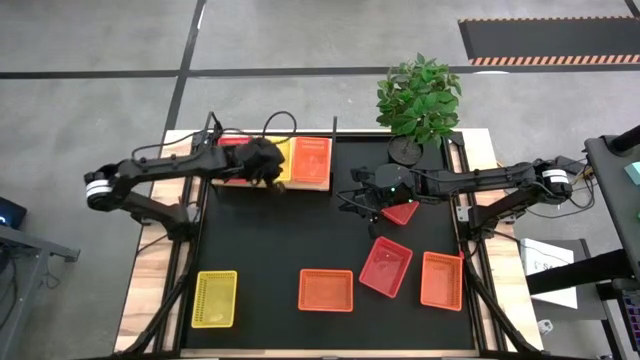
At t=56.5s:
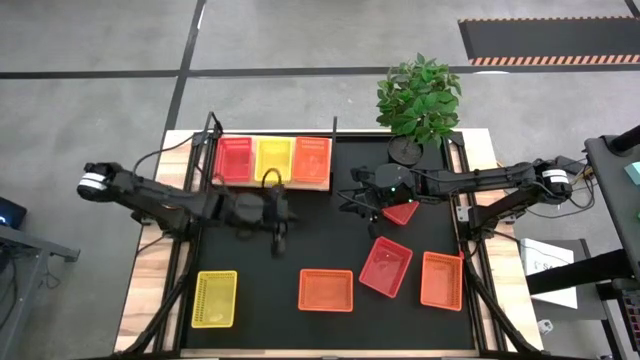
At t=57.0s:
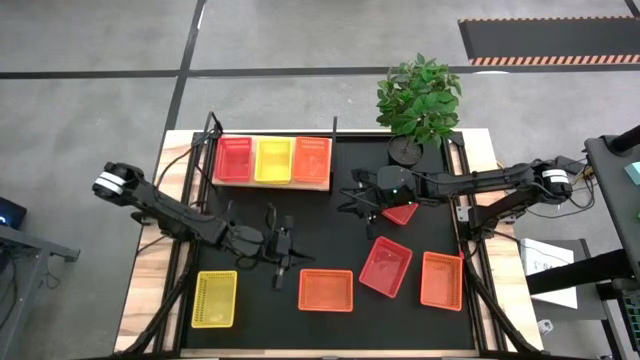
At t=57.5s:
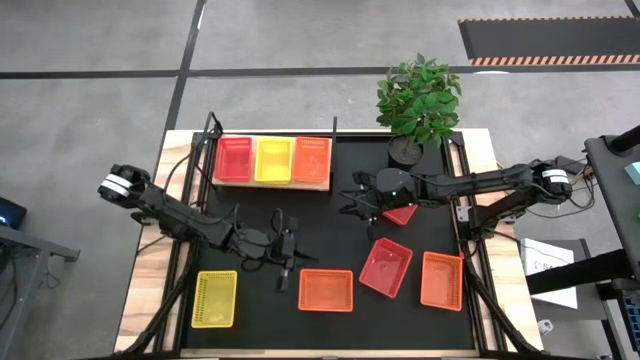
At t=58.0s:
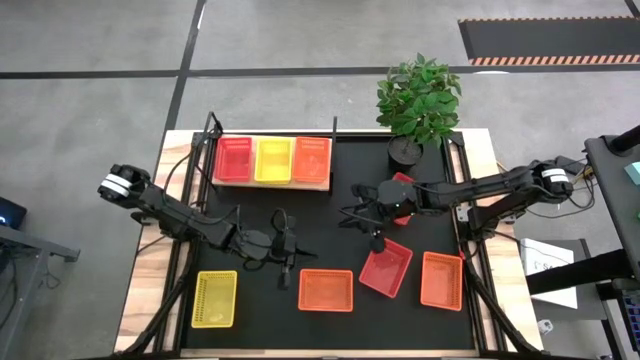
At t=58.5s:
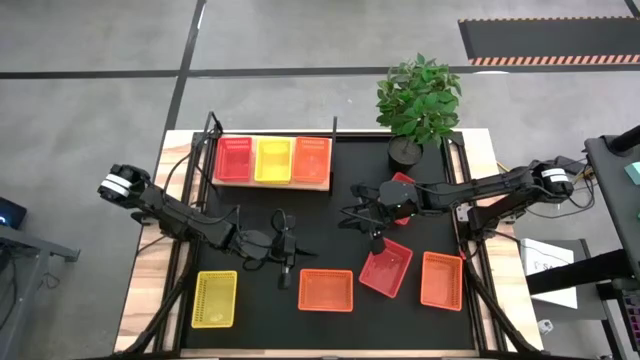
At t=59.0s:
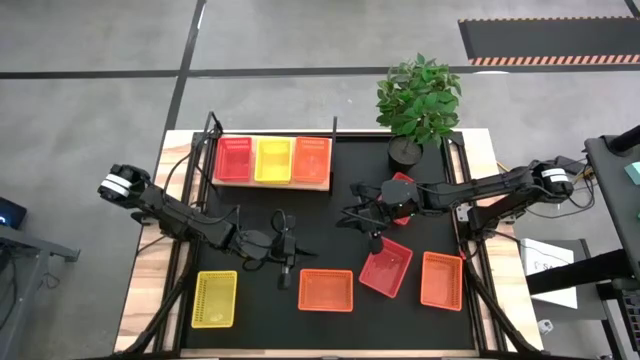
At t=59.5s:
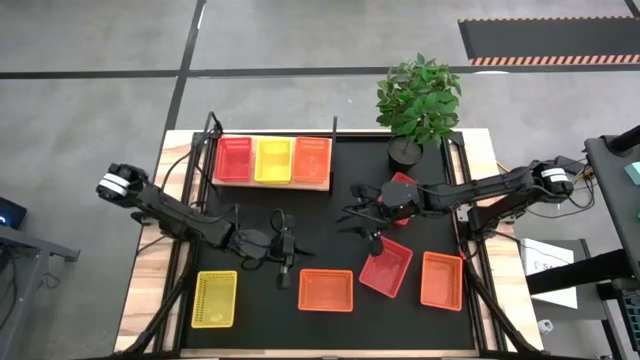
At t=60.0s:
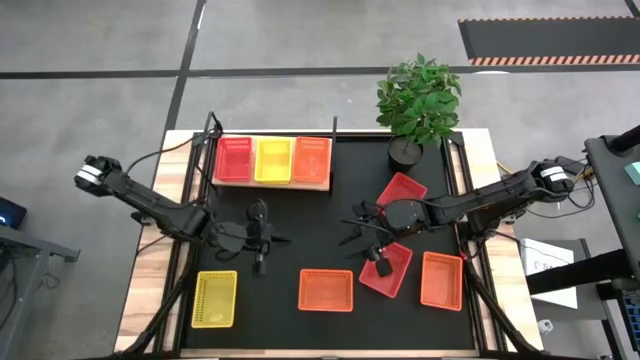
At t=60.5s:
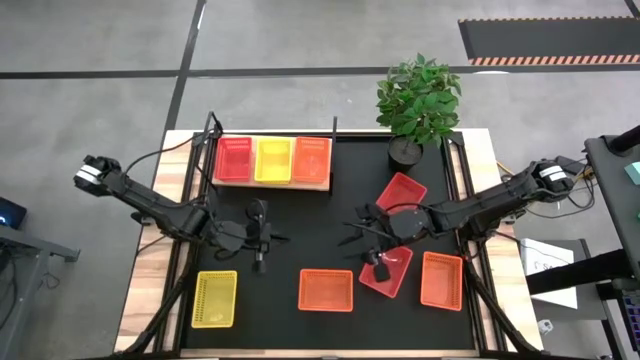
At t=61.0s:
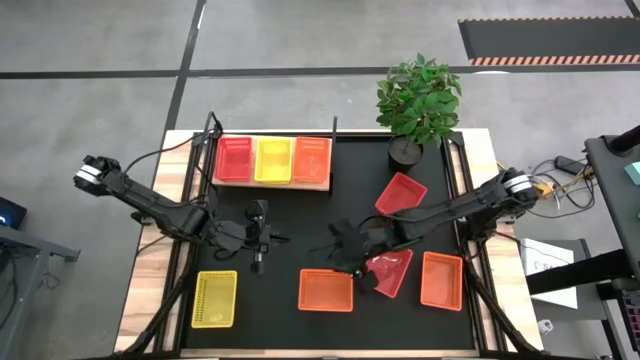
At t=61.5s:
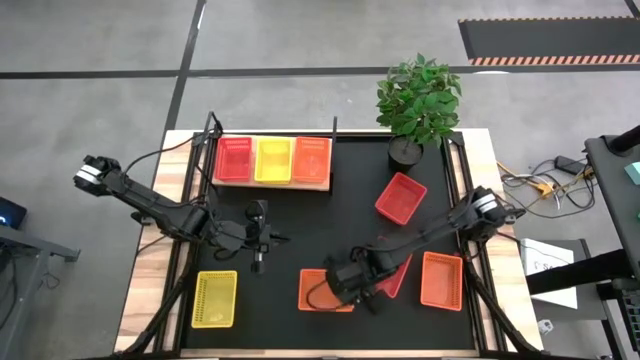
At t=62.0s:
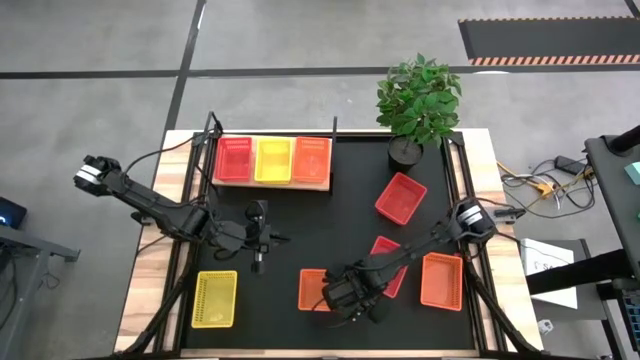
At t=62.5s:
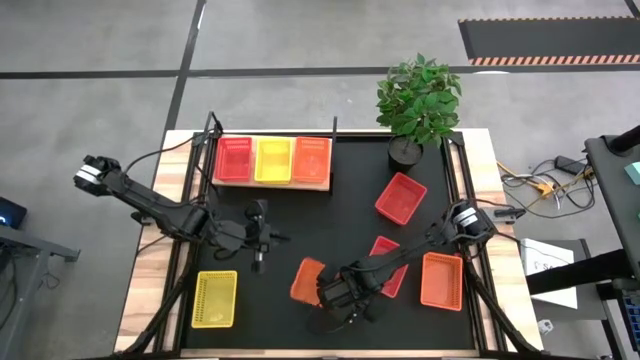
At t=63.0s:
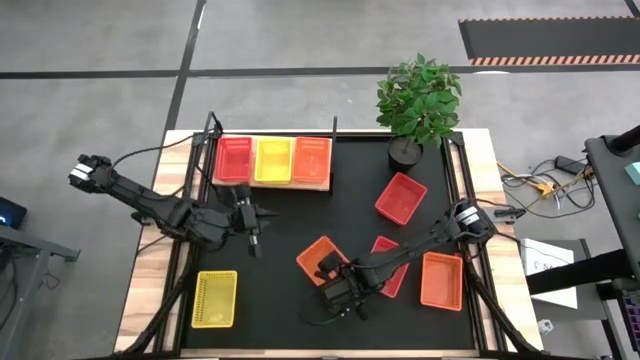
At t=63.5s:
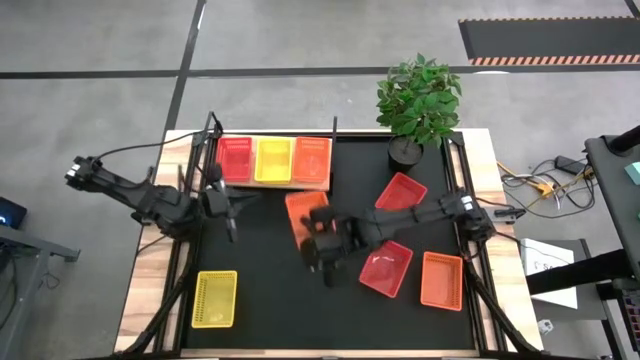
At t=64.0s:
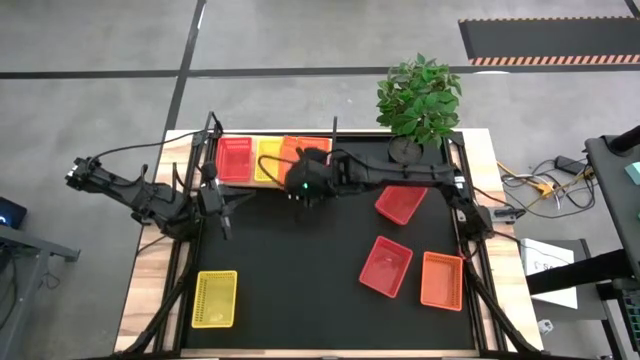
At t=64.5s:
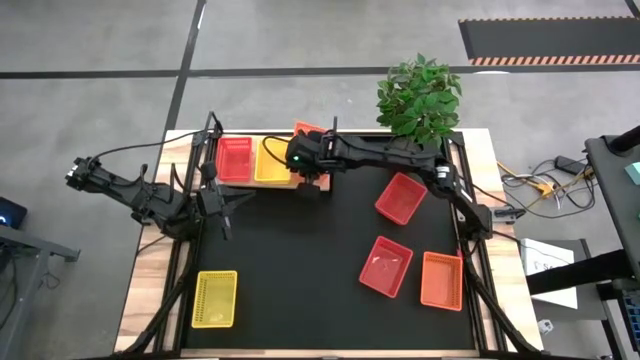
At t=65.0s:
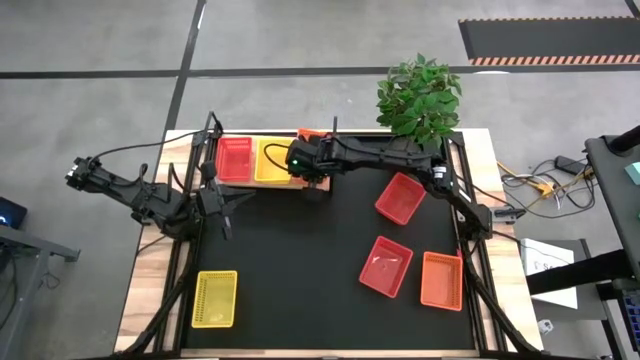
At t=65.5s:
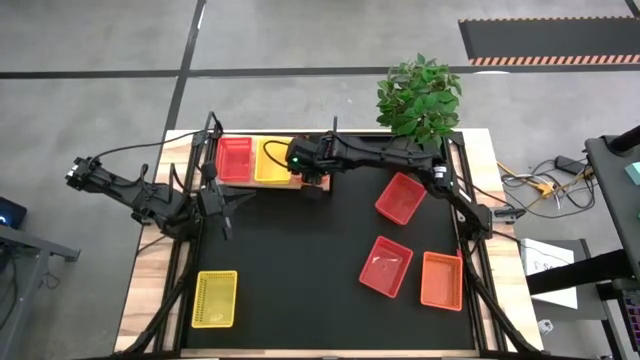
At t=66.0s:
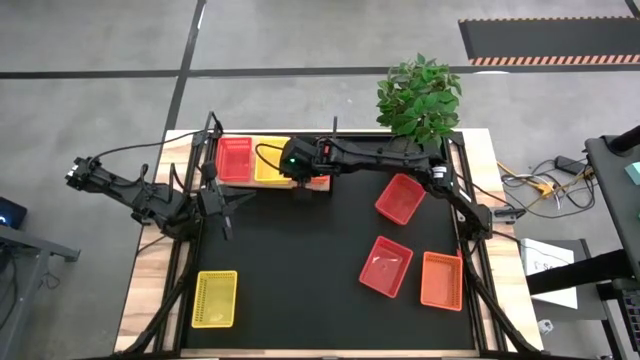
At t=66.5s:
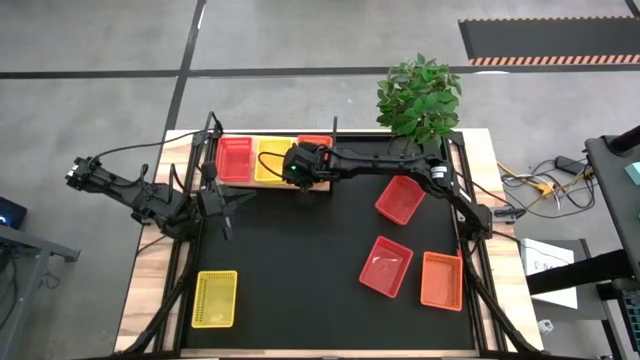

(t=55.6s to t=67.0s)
Task: Stack baskets on shelf by color
Stack the left orange bin on top of the other orange bin on the shelf

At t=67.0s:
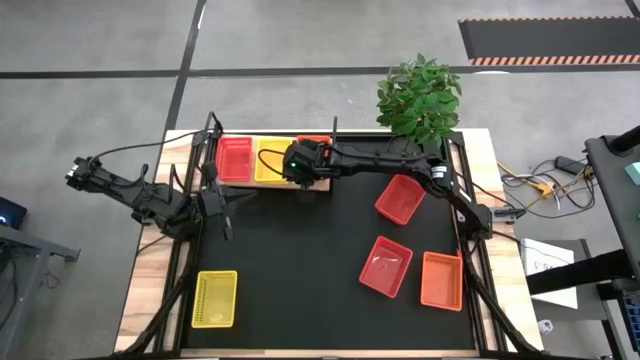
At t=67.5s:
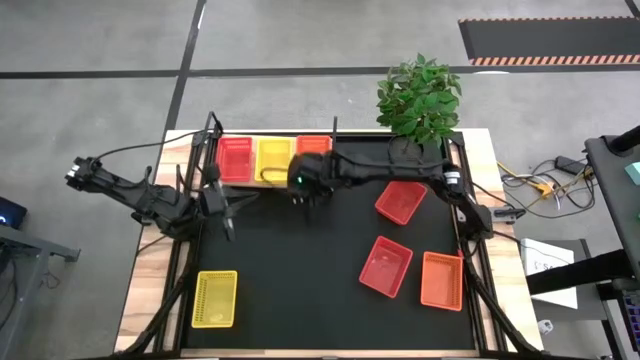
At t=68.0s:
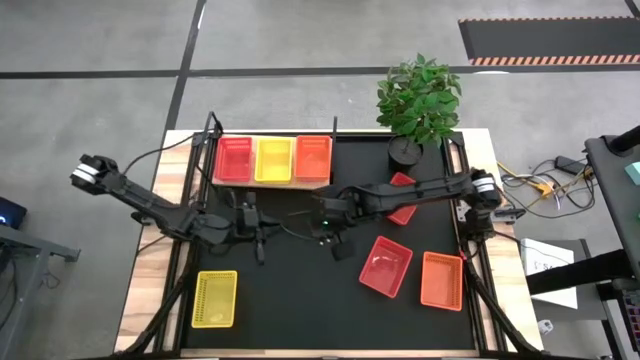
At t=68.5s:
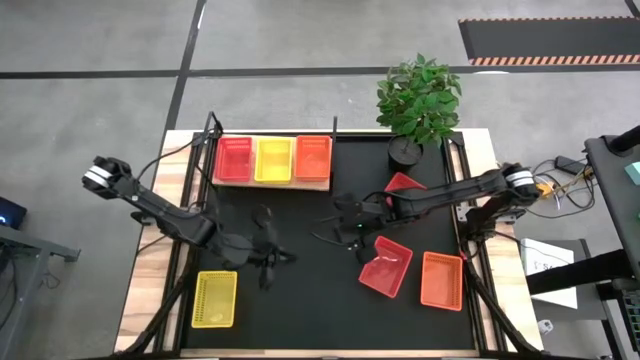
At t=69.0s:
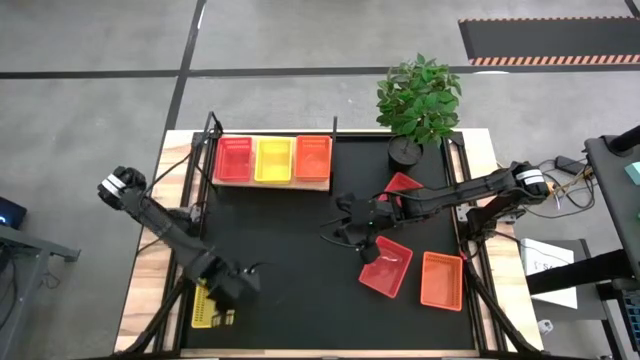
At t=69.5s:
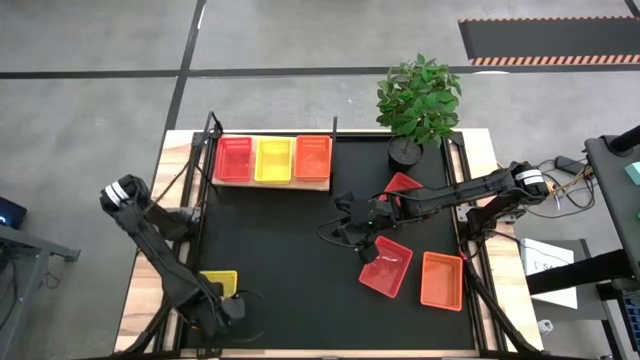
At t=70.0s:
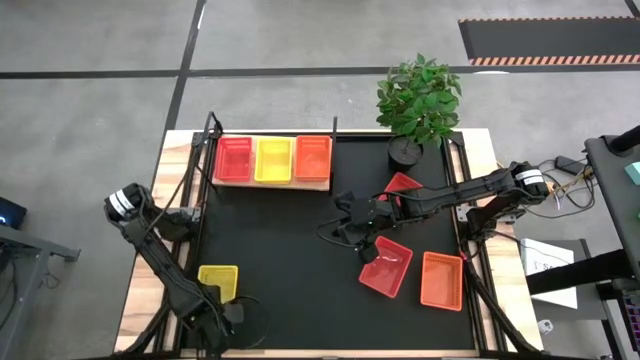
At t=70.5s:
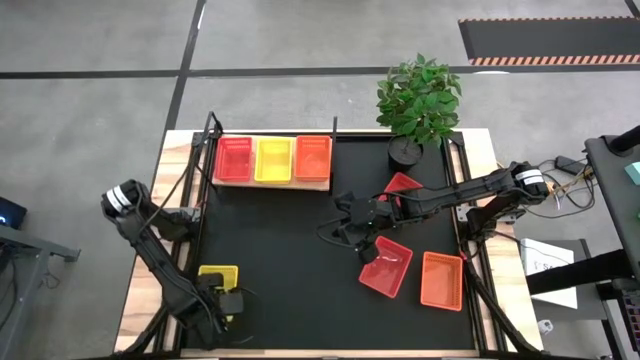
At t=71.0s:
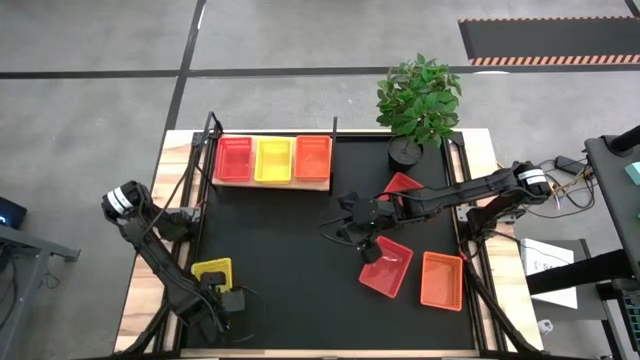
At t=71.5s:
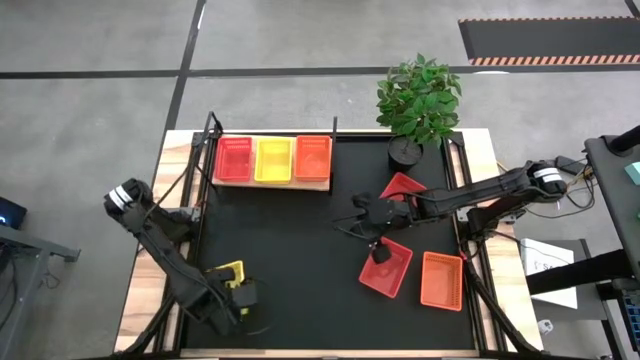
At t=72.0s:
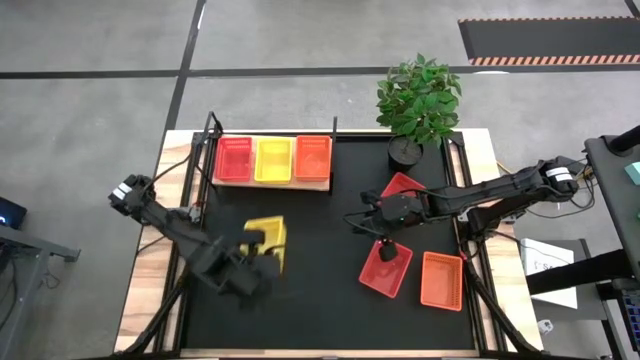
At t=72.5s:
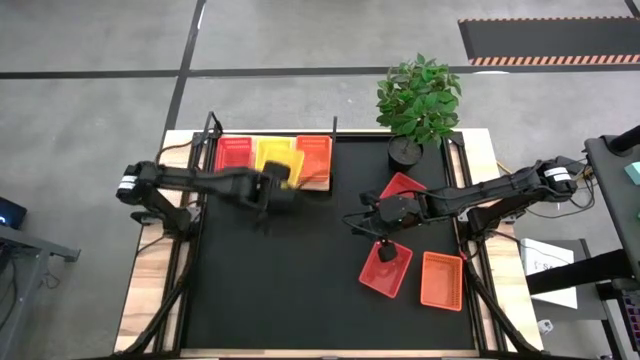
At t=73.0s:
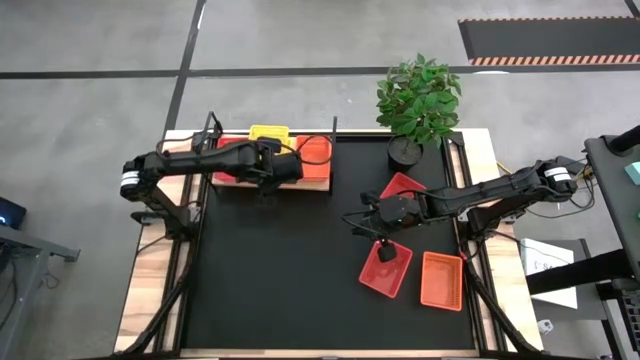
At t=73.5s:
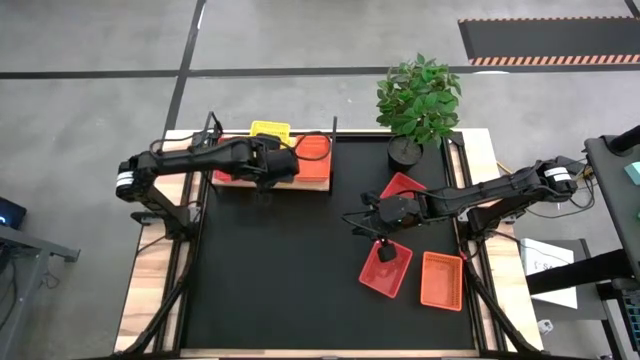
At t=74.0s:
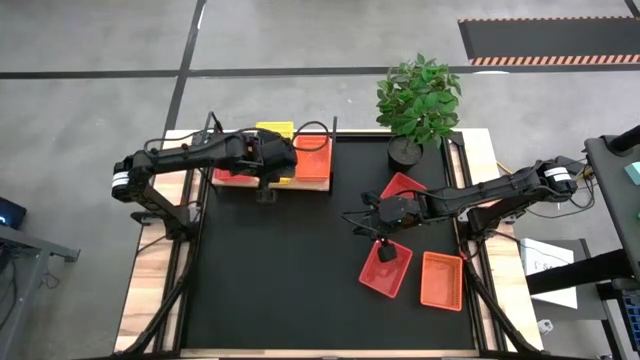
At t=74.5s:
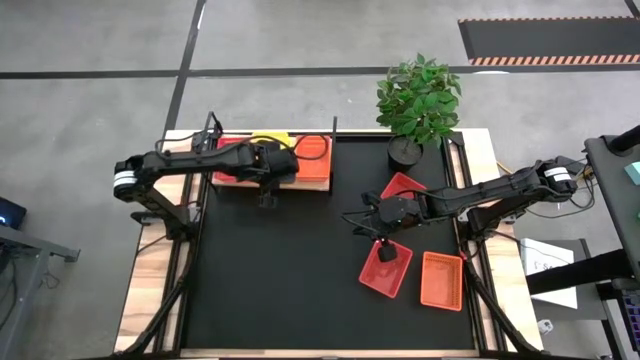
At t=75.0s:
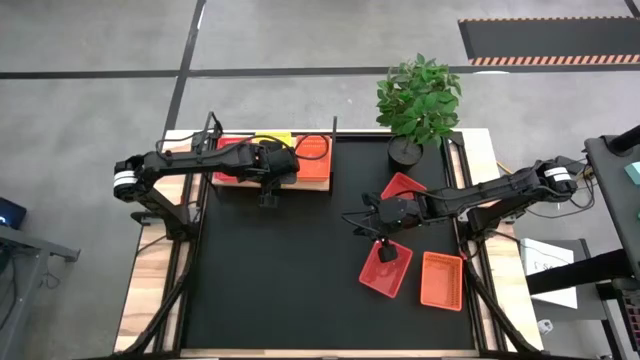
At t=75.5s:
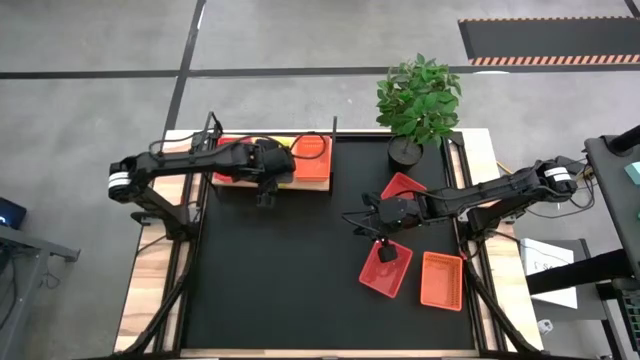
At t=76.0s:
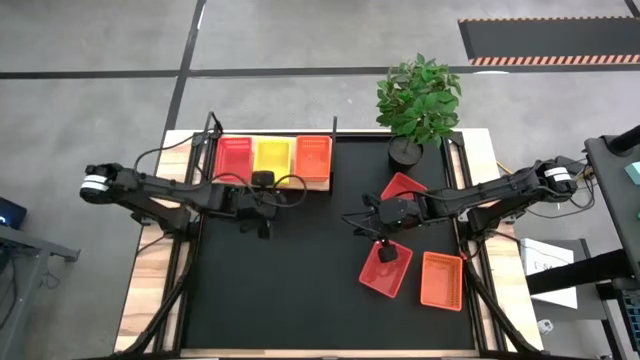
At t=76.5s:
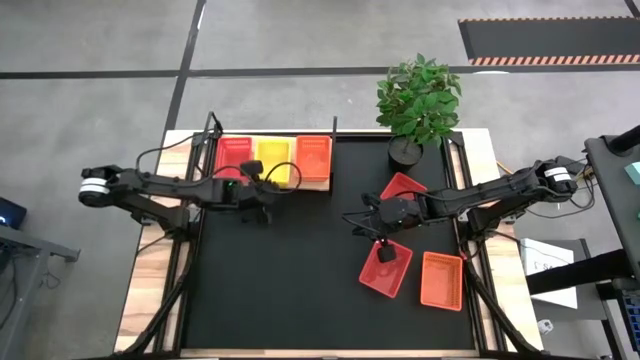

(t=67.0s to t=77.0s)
Stack the yellow bin on top of the other yellow bins on the shelf
